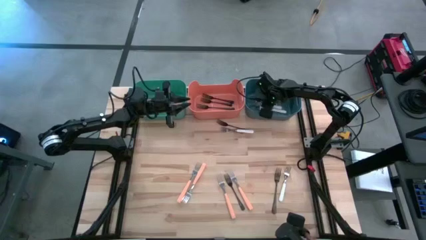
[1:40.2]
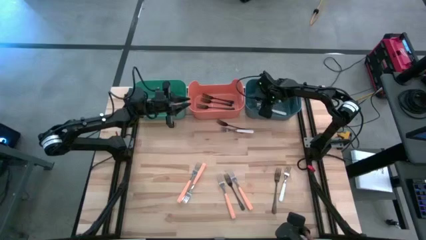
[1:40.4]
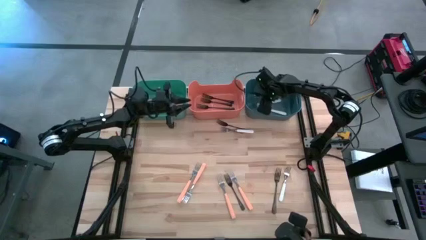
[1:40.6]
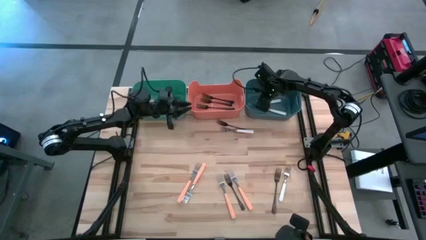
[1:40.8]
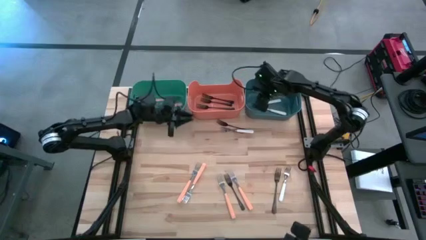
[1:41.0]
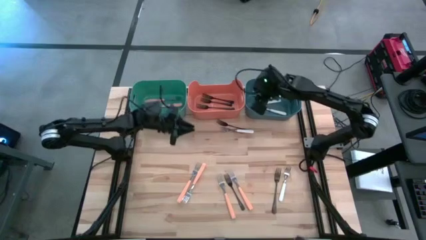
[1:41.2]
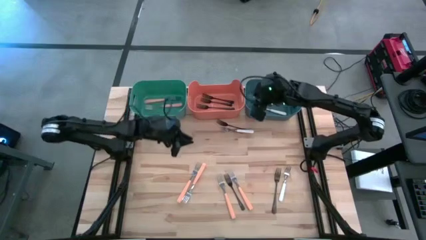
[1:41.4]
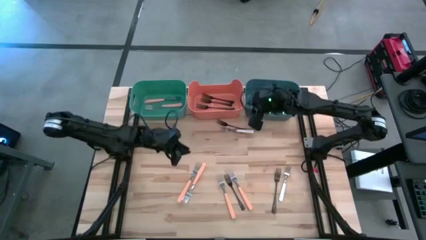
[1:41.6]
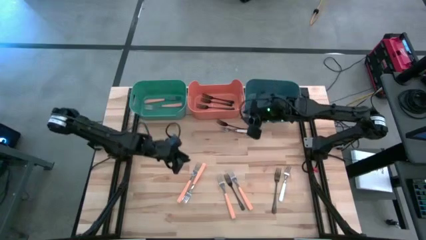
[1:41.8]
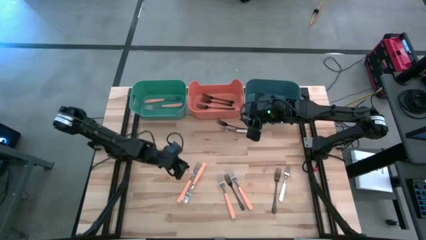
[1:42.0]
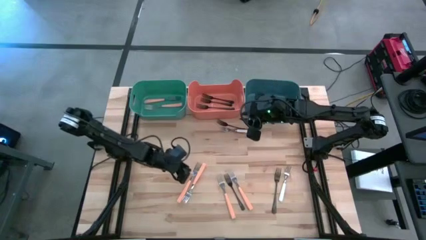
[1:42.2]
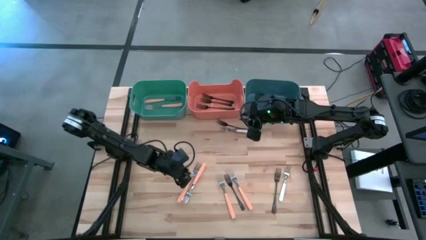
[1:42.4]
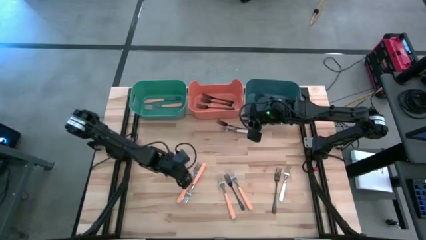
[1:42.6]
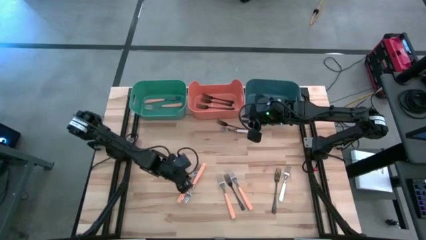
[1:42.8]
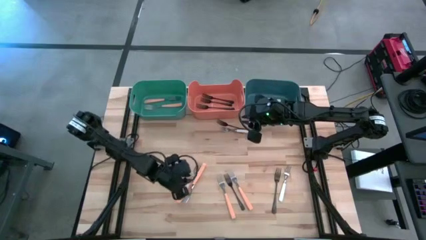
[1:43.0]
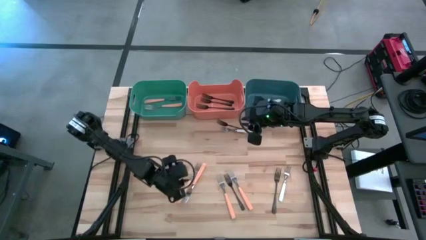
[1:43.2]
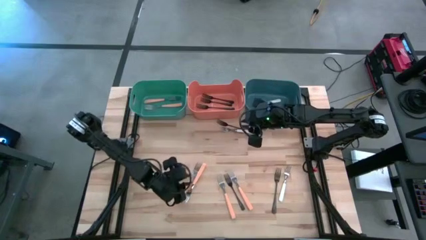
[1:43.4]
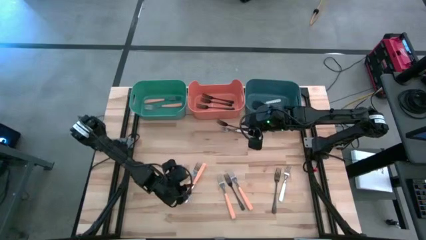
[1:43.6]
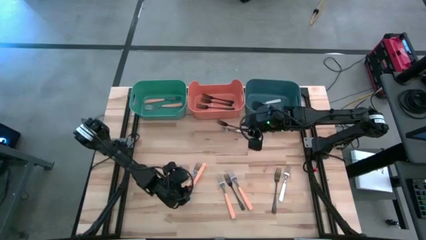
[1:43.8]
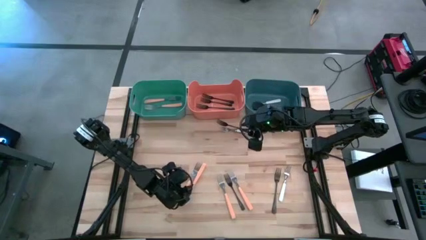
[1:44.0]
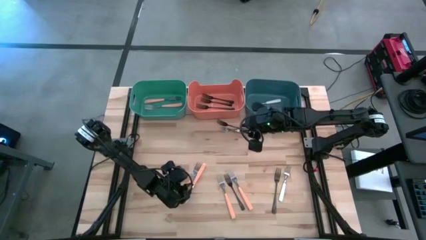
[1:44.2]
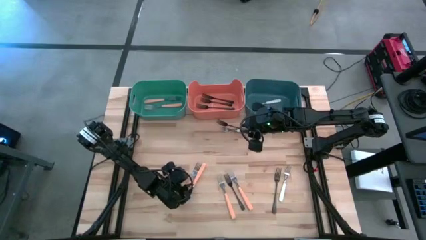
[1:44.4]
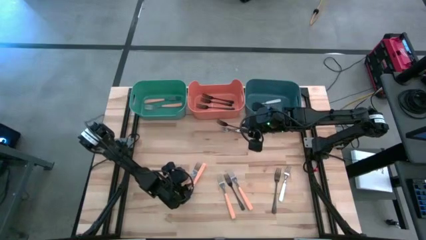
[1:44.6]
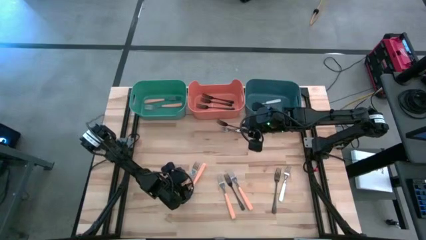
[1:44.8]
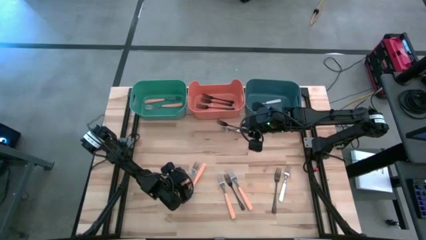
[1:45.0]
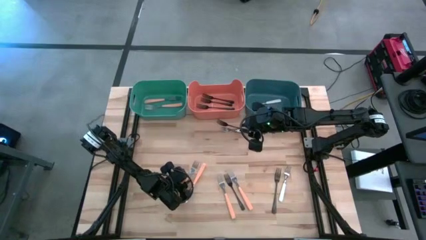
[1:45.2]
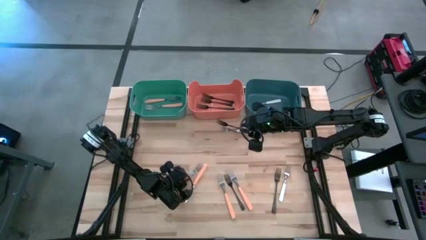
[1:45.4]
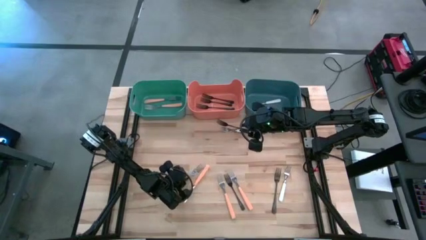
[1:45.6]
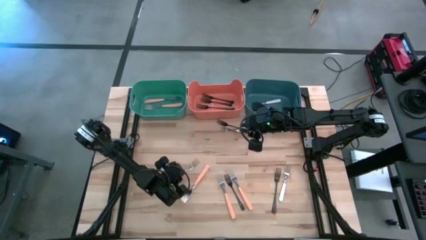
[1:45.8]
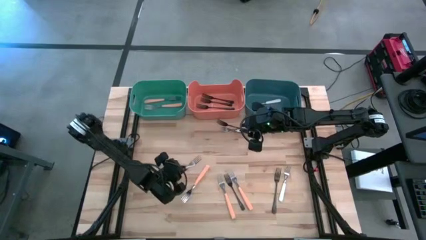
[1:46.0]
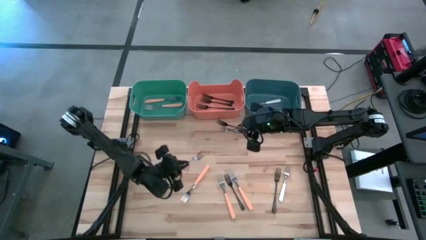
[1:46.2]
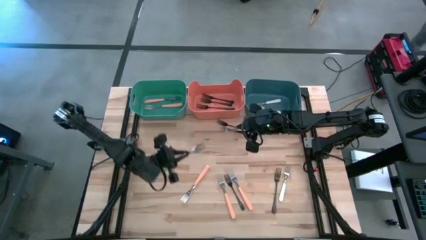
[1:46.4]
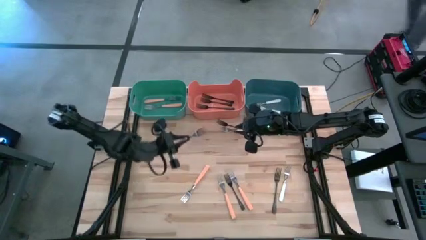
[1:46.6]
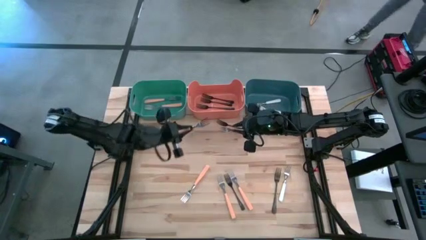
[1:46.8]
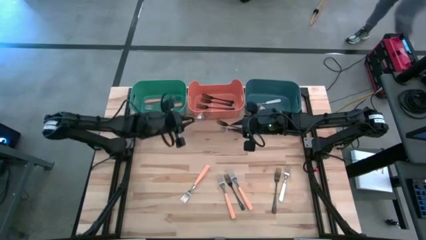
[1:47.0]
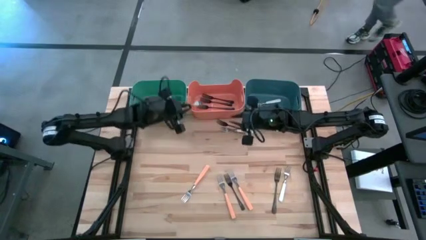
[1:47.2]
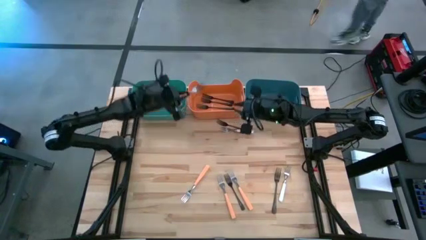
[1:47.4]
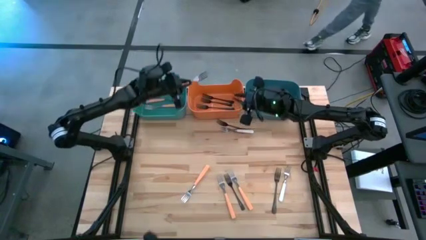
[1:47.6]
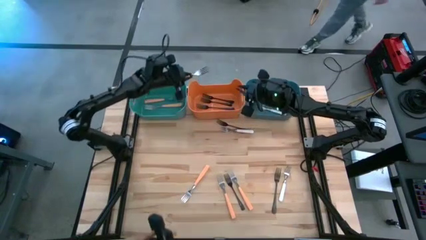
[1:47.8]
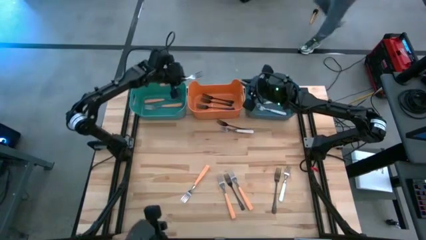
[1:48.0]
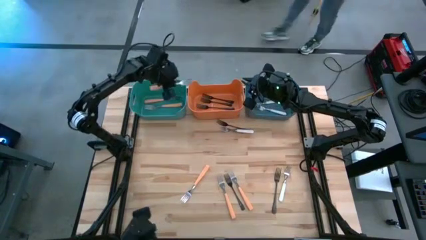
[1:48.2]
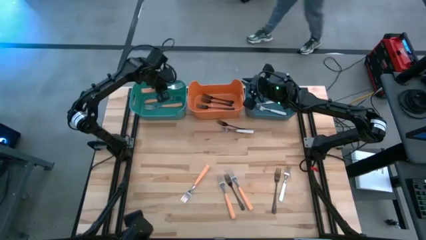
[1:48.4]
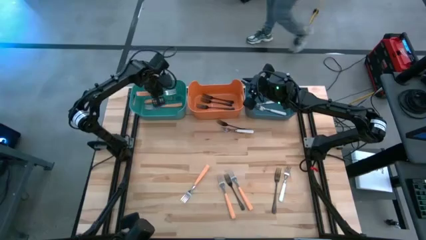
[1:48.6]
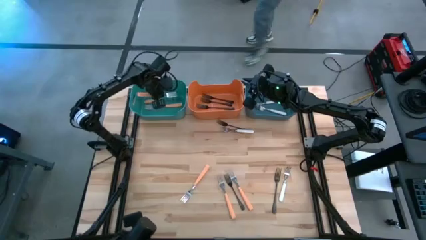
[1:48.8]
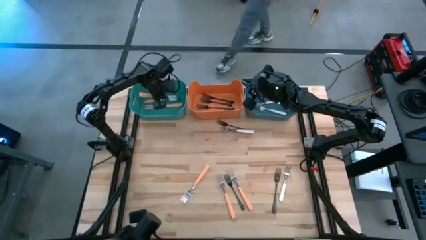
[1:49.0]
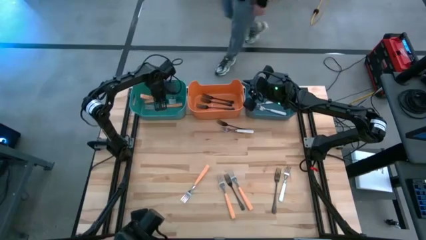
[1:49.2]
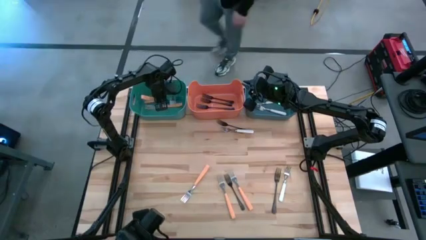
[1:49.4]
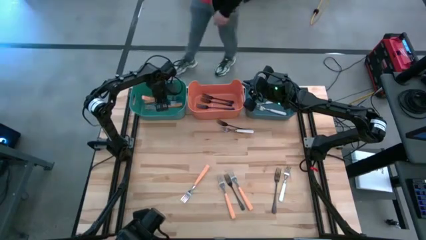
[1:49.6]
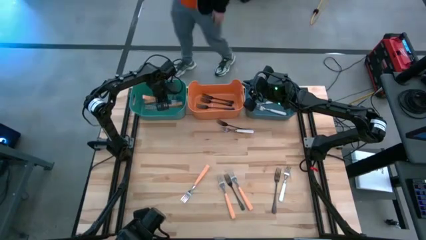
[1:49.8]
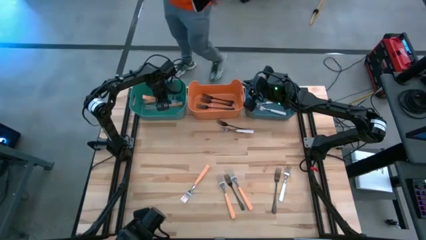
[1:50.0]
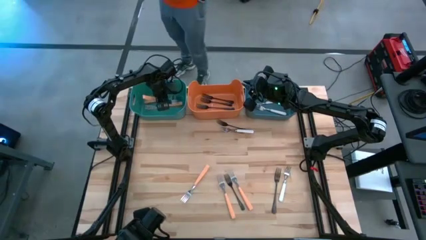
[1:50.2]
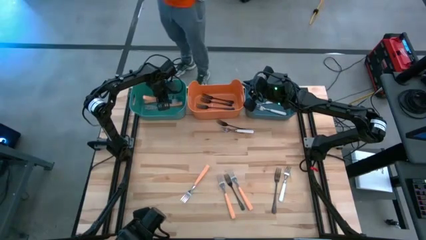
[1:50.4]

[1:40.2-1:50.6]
Task: Sort silverware by color (type)
Put the orange fork into the green bin

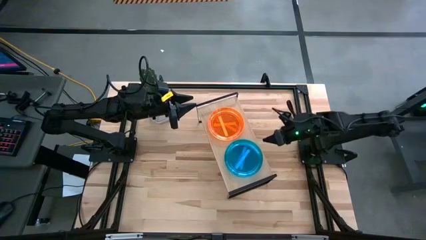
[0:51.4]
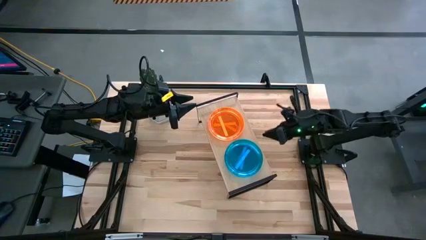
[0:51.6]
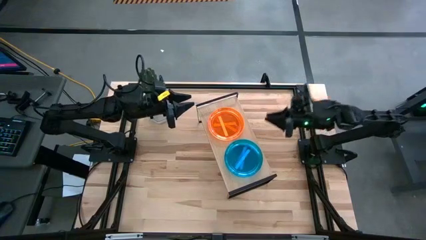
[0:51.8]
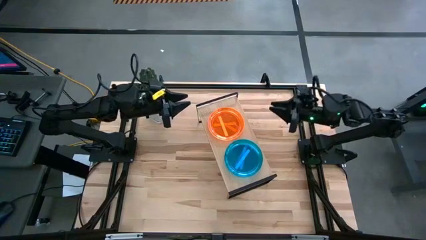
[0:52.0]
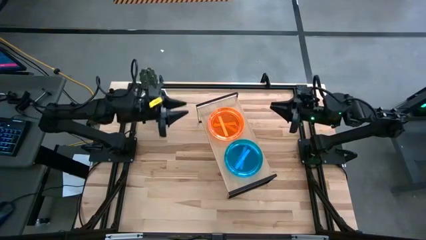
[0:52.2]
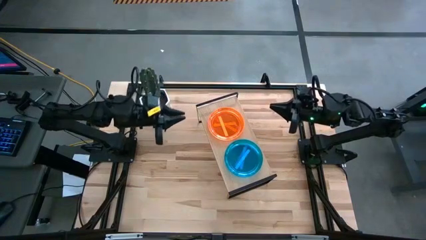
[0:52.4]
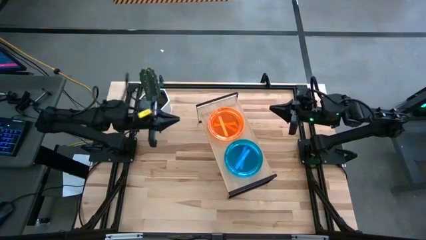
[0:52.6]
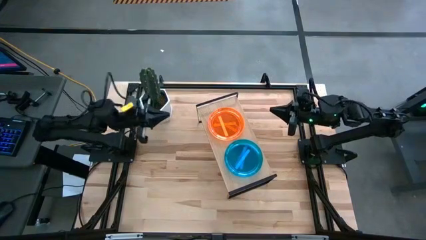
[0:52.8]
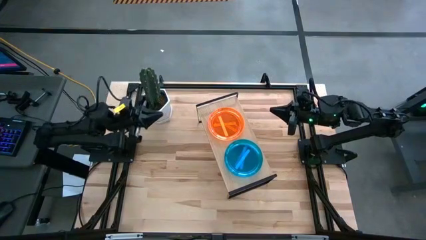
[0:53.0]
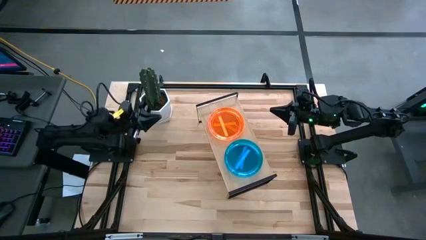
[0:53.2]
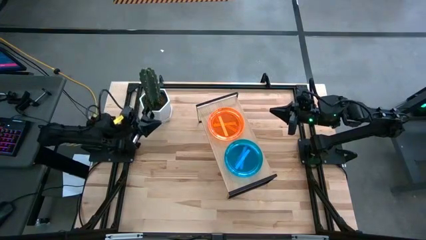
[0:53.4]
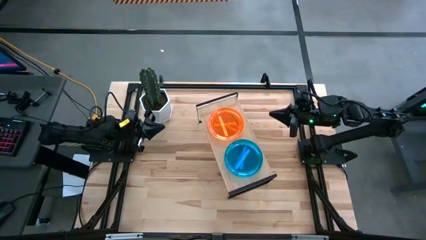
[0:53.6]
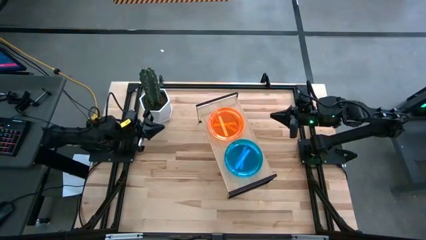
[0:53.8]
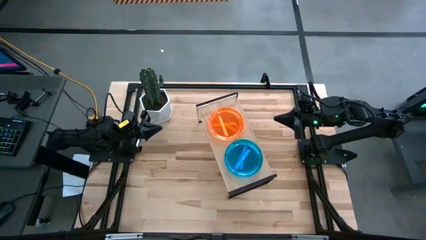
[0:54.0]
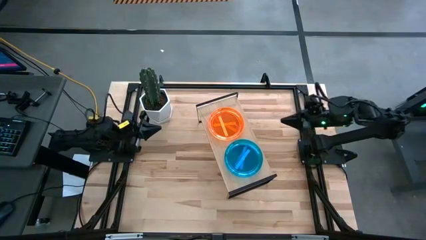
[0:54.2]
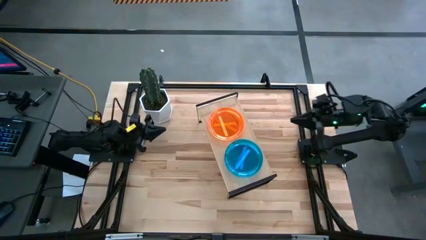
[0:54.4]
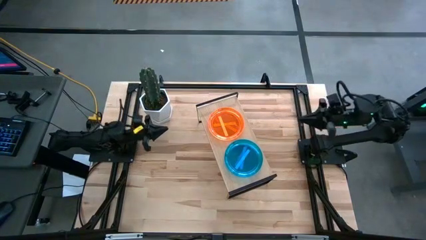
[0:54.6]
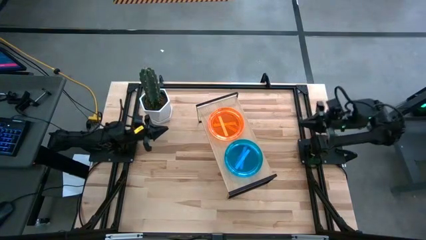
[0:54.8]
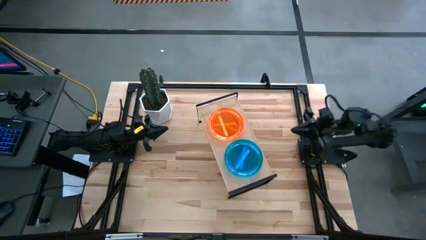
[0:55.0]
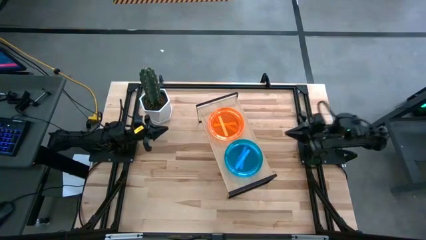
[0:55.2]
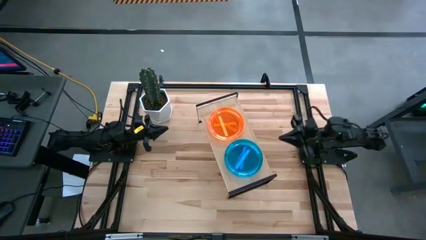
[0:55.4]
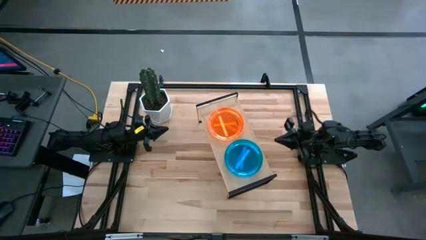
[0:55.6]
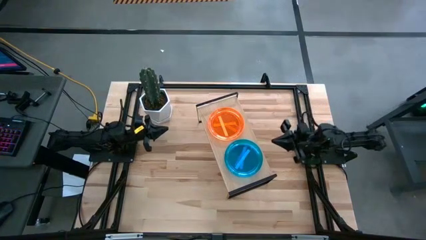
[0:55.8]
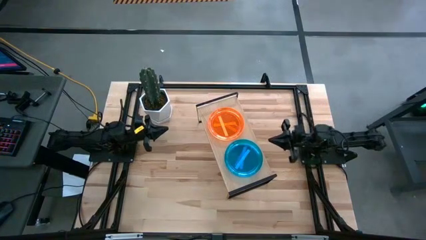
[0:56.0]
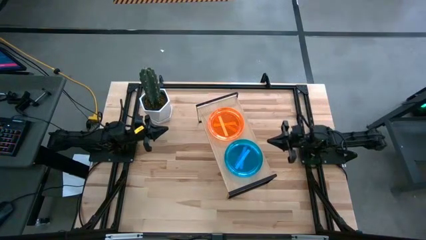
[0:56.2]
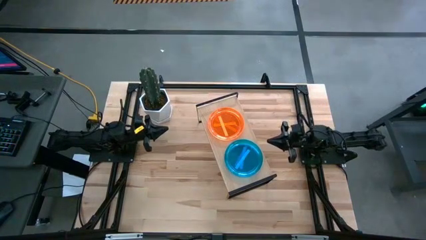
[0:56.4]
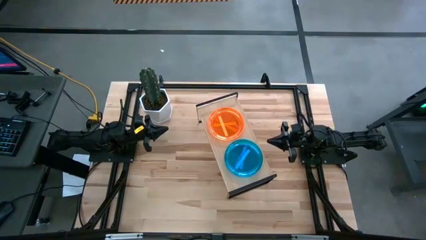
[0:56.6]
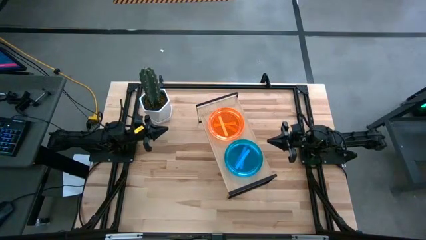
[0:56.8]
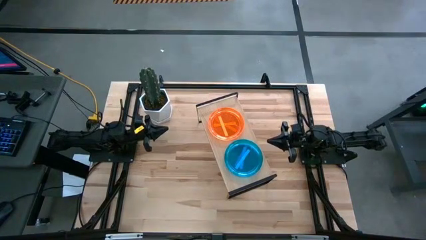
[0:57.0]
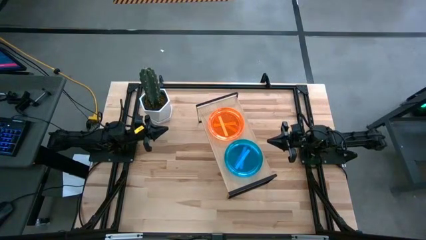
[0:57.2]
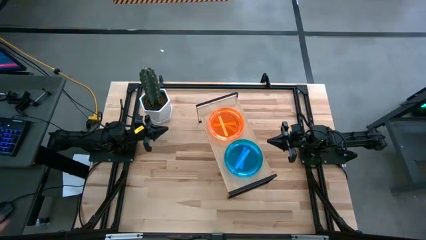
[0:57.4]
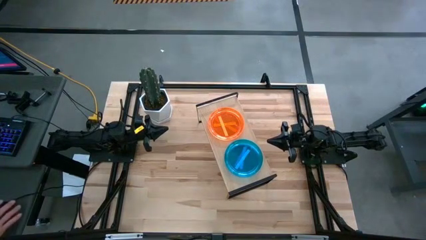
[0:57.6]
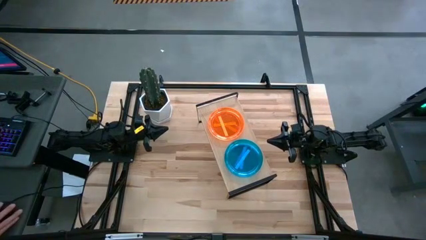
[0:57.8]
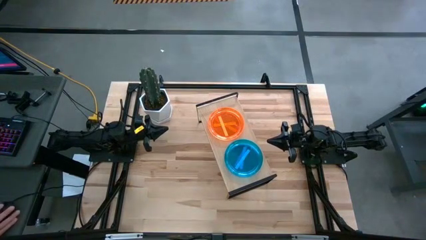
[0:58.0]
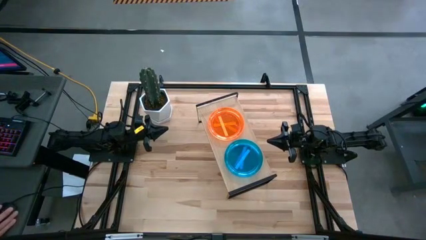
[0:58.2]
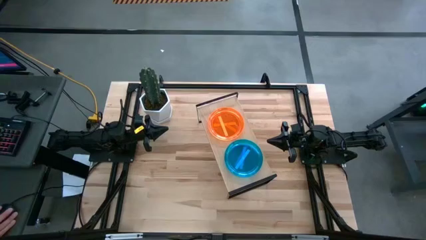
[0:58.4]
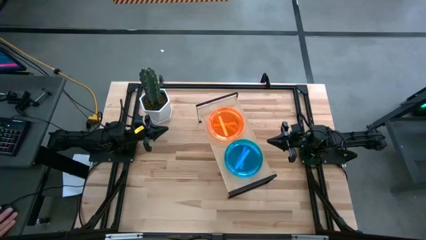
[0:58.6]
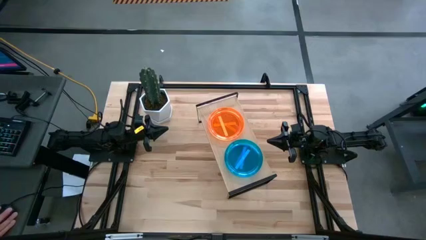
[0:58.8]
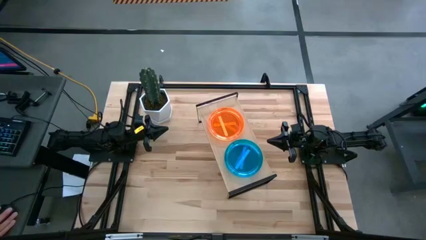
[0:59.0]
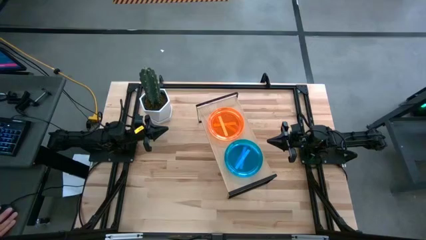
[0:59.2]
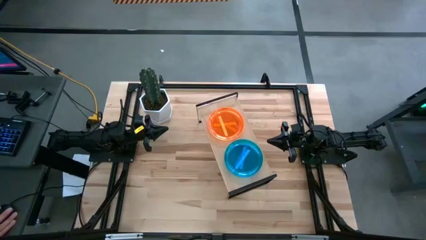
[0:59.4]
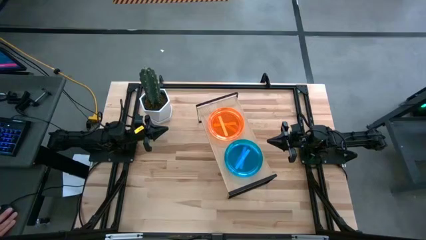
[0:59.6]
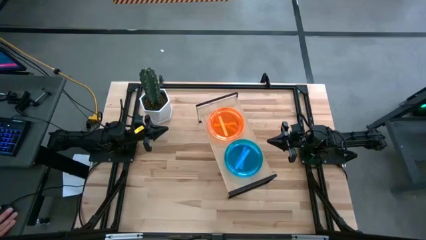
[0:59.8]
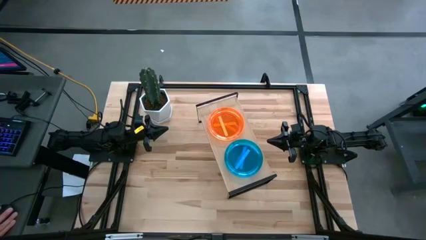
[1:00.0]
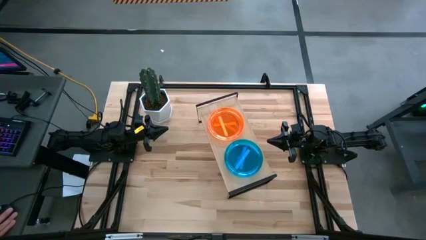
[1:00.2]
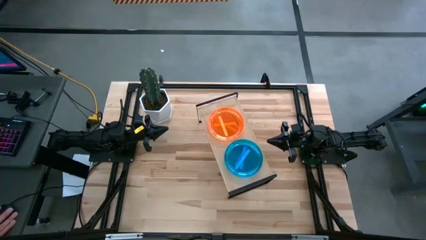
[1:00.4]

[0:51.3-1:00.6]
Task: Place and stack plates onto a shelf
Return to Home Position
